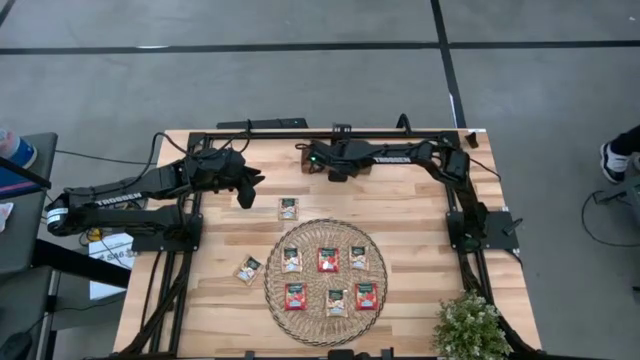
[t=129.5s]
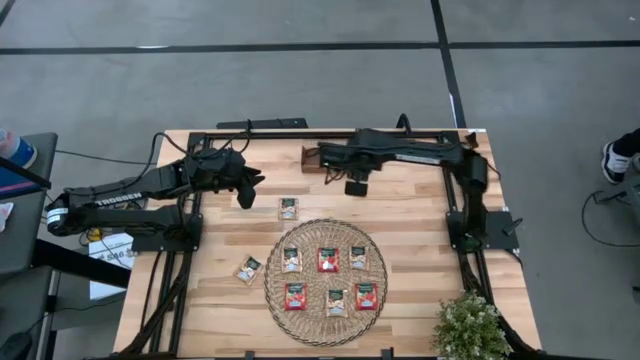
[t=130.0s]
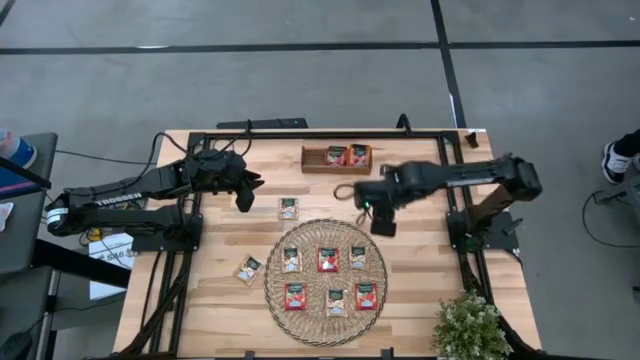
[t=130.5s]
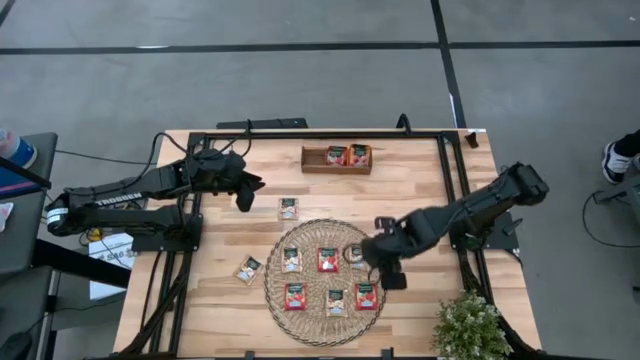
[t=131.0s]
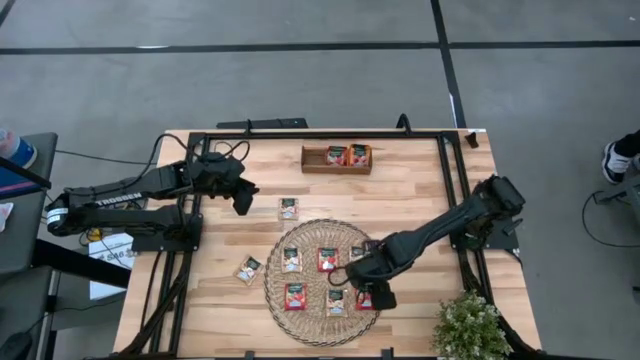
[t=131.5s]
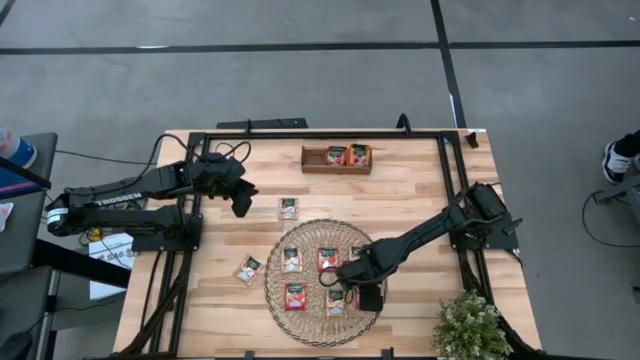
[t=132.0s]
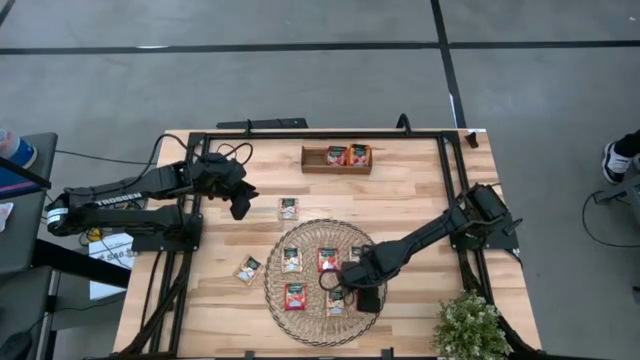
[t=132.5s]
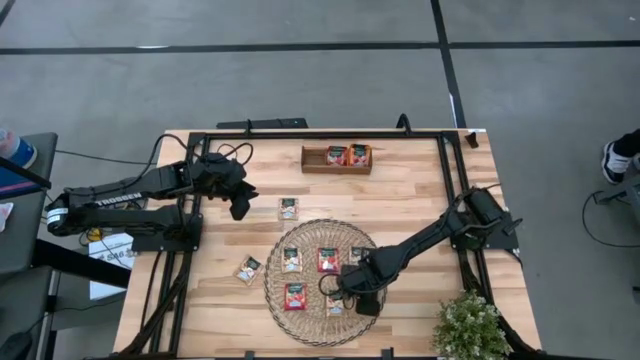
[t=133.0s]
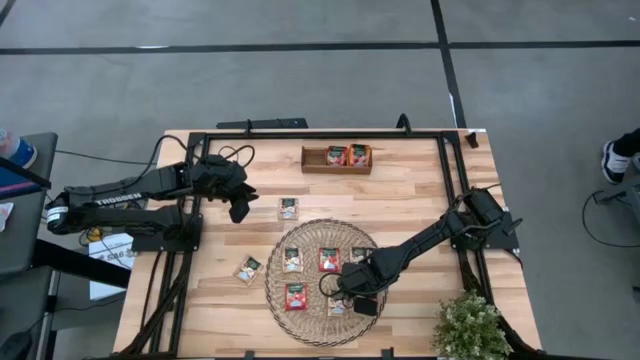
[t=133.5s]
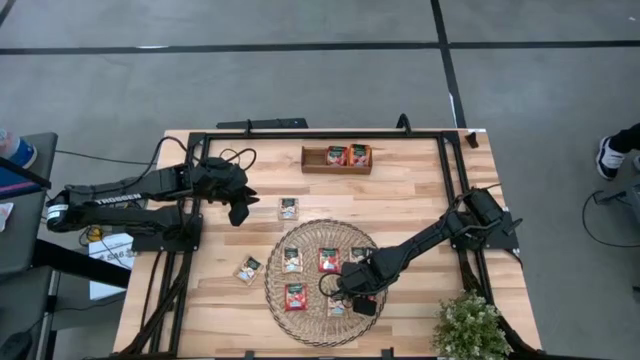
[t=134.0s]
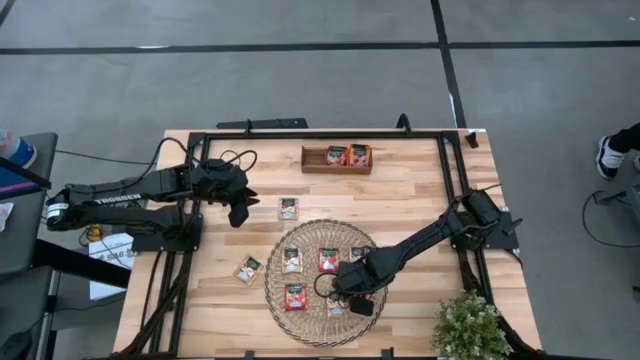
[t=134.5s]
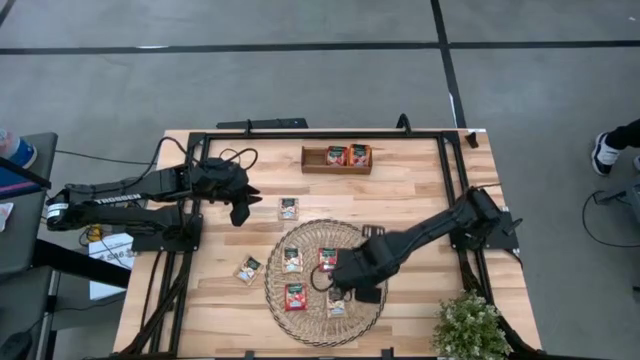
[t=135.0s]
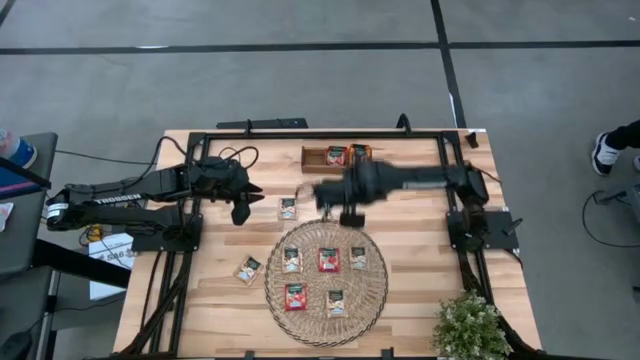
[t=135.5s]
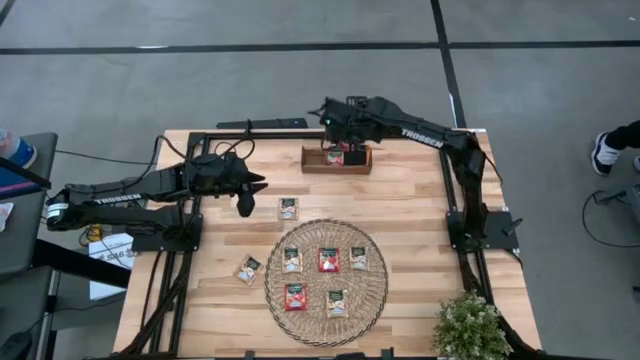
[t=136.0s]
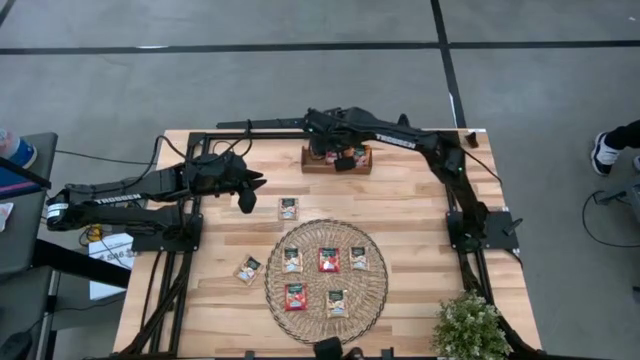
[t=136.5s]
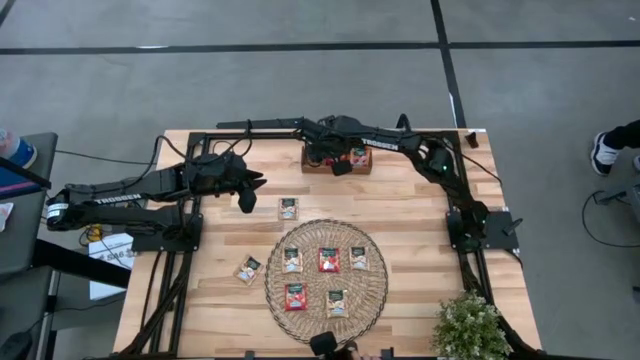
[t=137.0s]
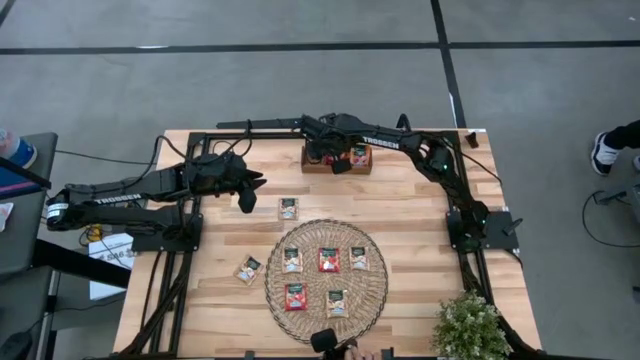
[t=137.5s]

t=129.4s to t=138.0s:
Task: Pick & Place Tea
Put the red tea bag into the middle section of the wooden organizer

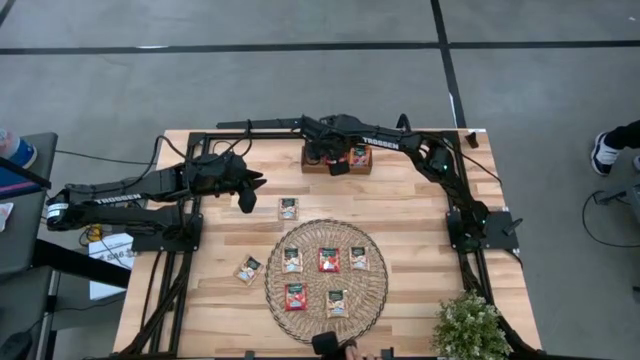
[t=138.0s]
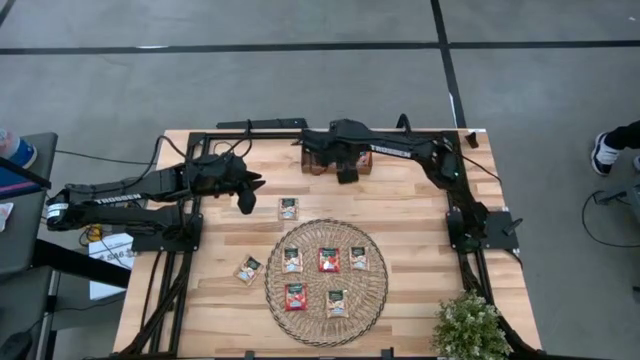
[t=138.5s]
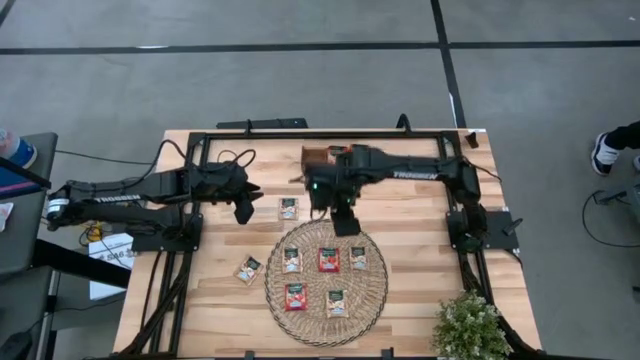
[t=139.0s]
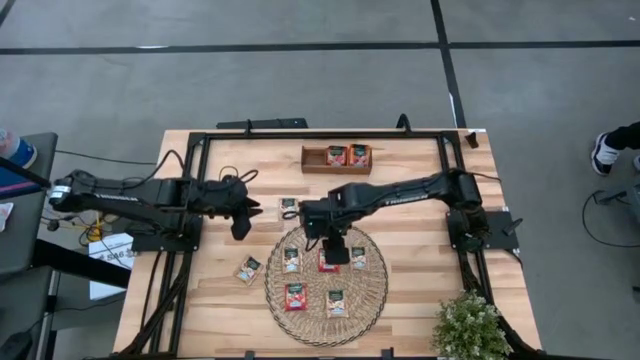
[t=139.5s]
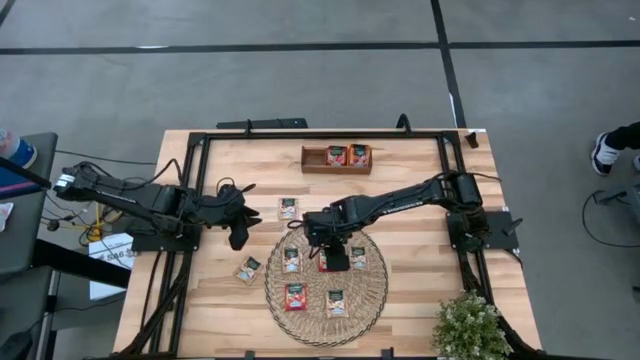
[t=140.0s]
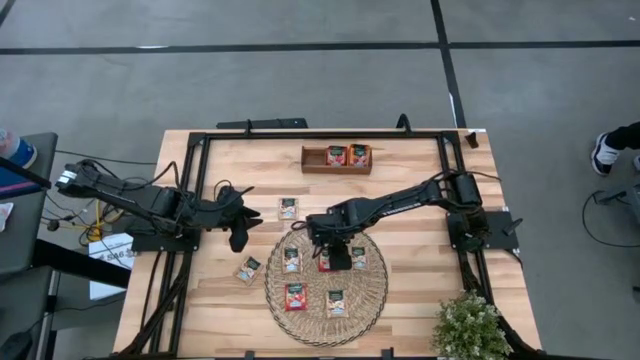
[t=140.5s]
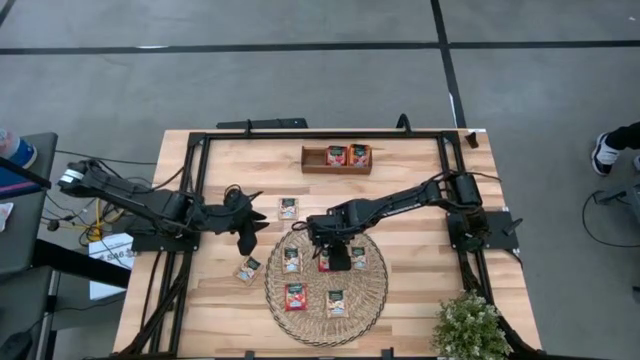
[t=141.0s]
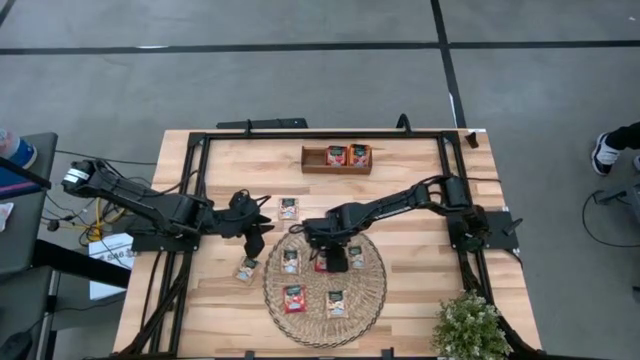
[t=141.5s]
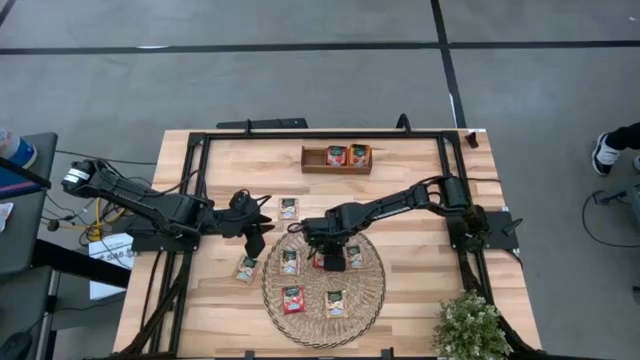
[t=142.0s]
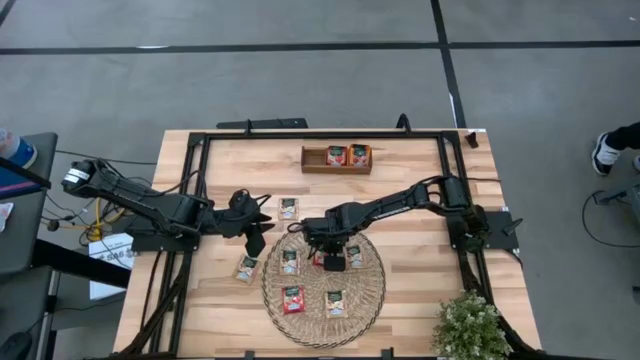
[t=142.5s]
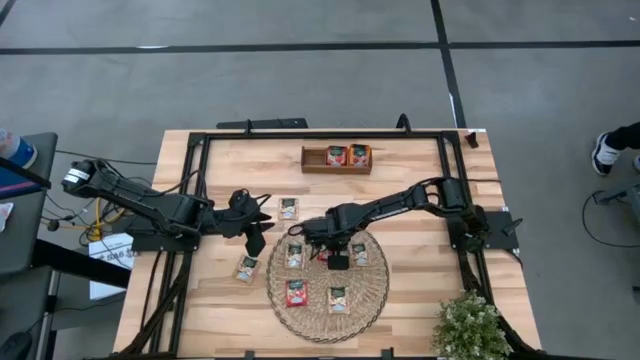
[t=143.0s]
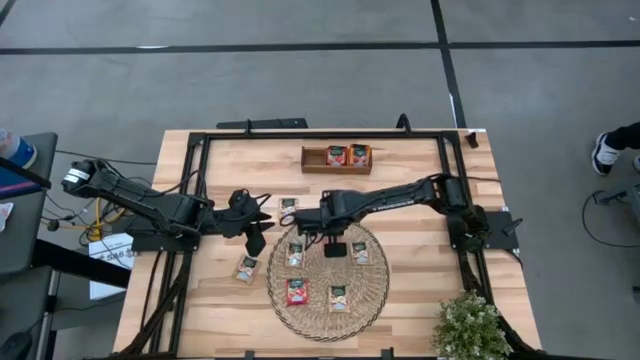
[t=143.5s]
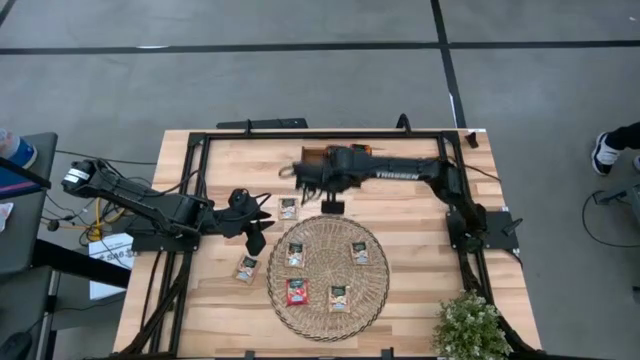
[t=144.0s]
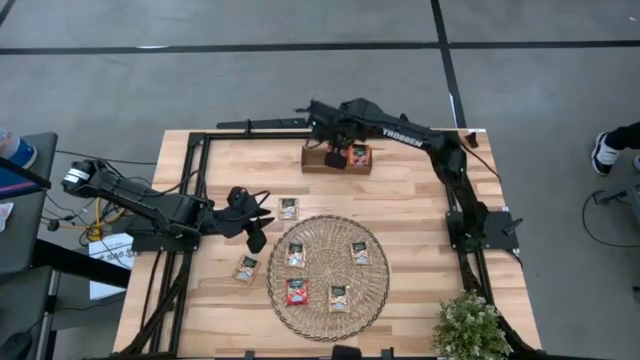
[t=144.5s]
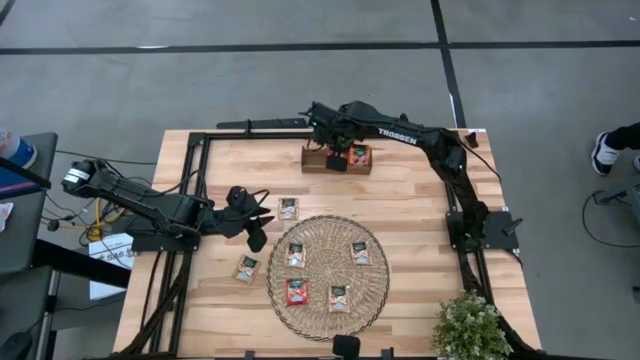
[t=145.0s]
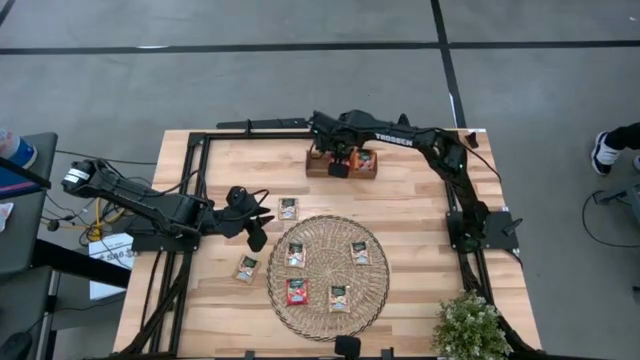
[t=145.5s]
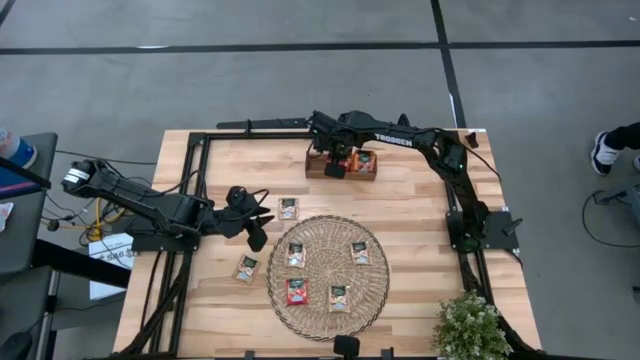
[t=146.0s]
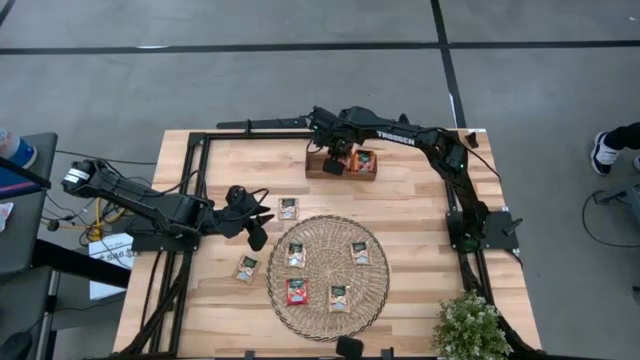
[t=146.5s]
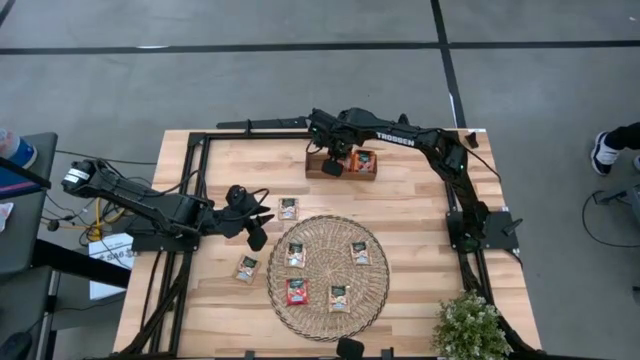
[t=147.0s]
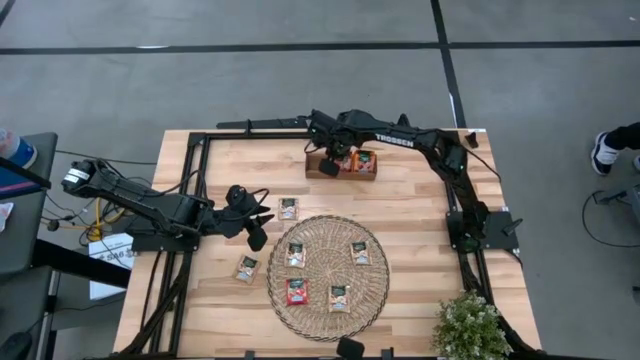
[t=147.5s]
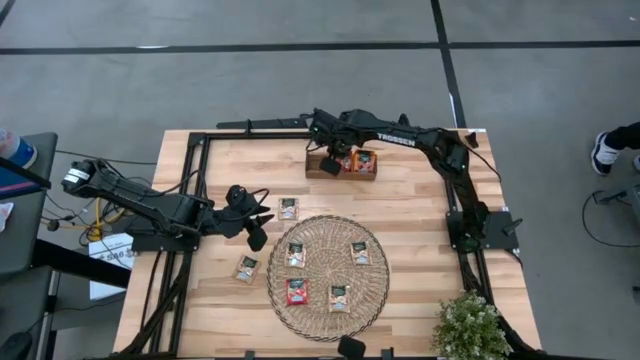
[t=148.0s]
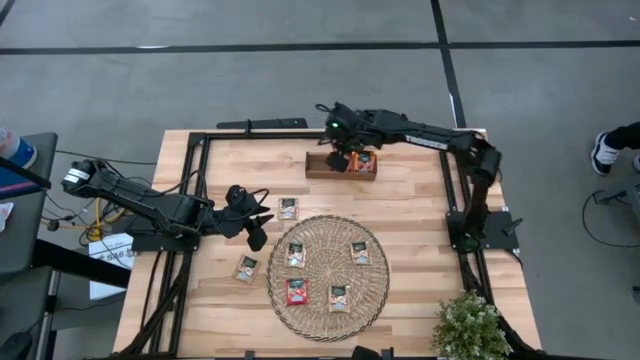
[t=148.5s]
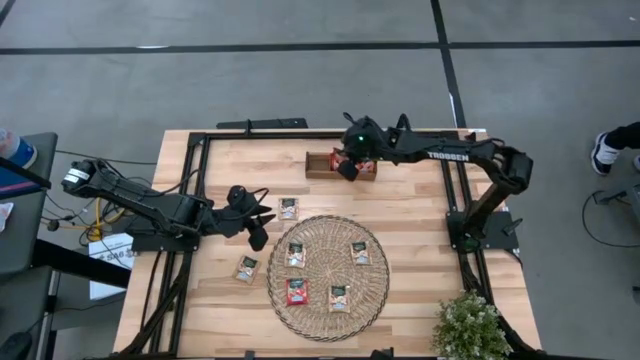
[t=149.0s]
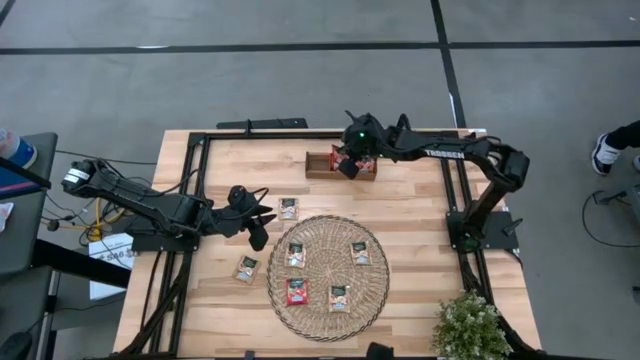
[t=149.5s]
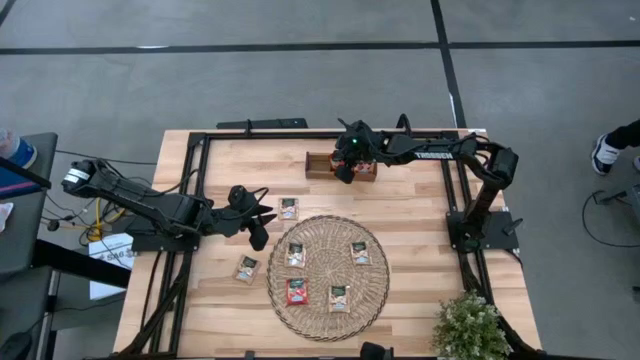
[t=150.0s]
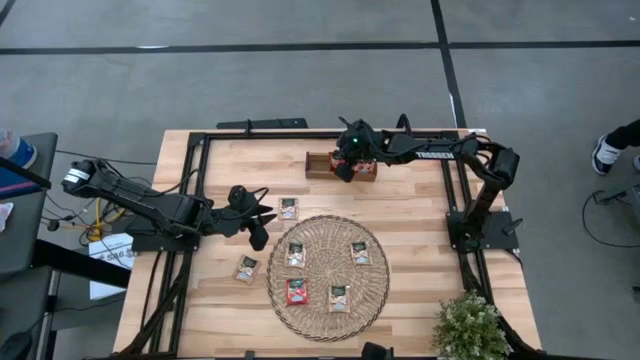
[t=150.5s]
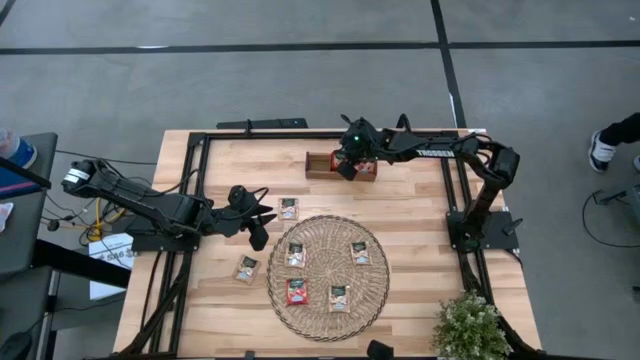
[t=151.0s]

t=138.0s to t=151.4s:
Put the red tea bag into the middle section of the wooden organizer
